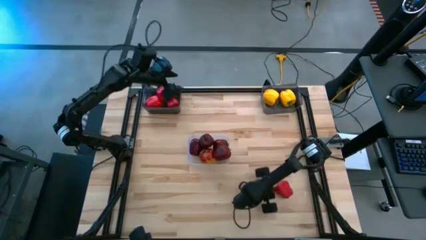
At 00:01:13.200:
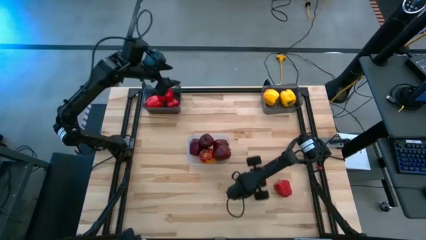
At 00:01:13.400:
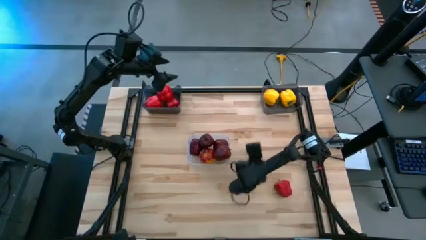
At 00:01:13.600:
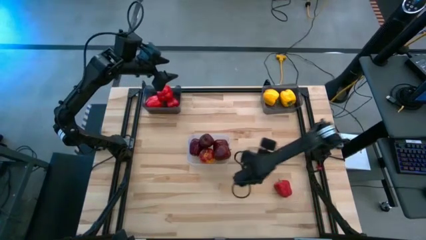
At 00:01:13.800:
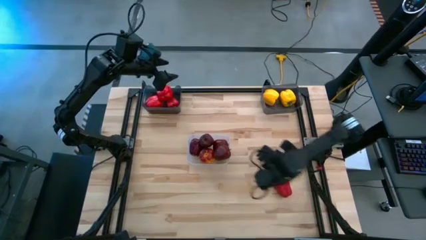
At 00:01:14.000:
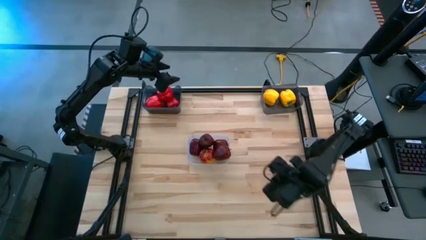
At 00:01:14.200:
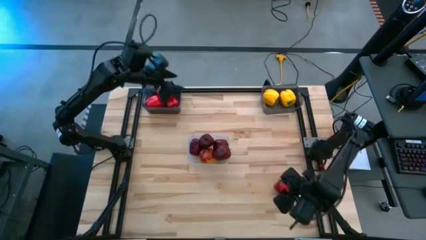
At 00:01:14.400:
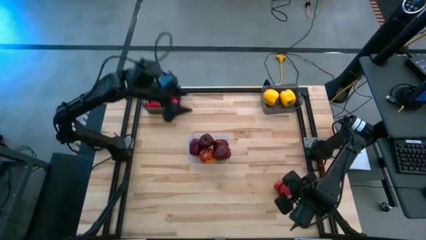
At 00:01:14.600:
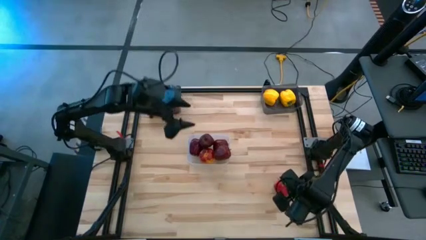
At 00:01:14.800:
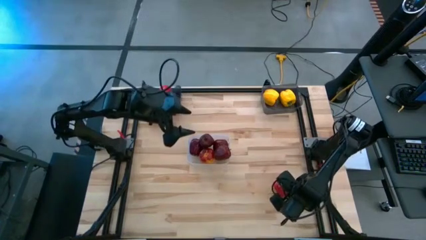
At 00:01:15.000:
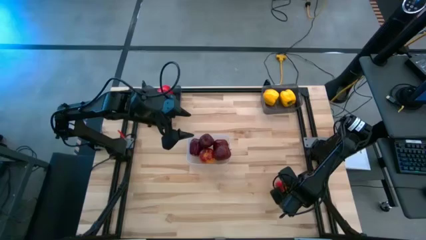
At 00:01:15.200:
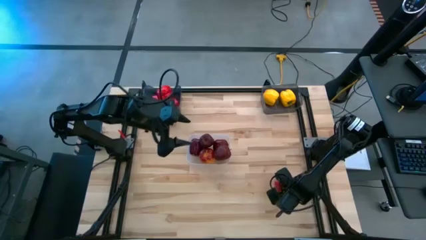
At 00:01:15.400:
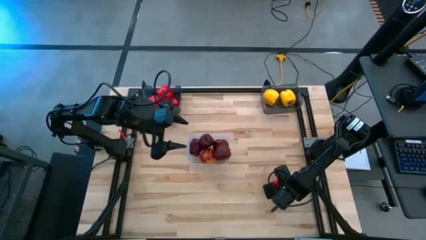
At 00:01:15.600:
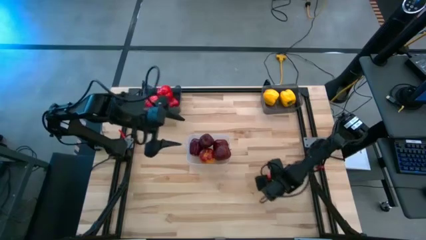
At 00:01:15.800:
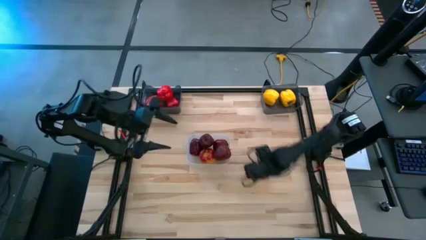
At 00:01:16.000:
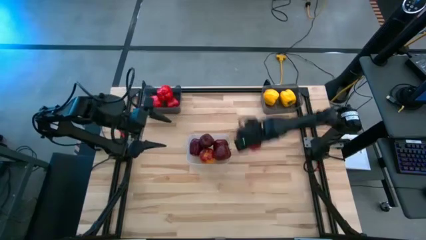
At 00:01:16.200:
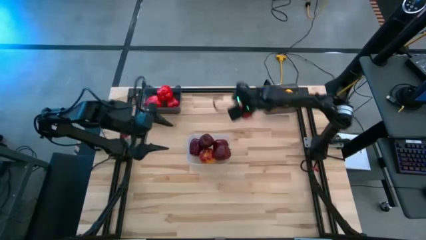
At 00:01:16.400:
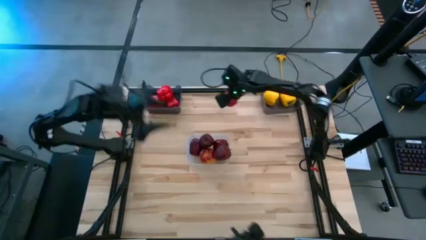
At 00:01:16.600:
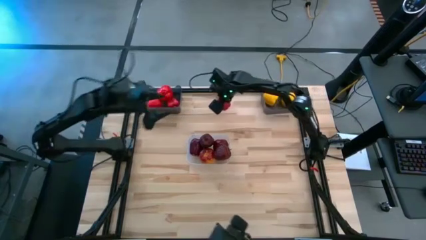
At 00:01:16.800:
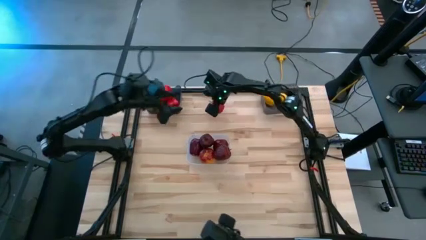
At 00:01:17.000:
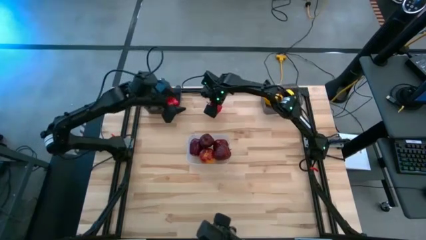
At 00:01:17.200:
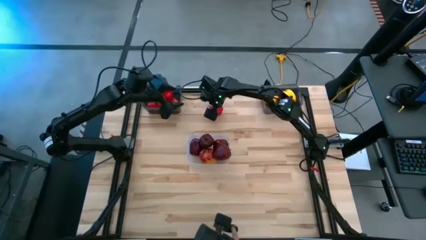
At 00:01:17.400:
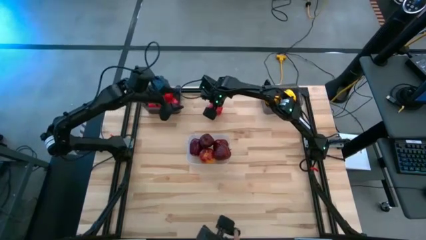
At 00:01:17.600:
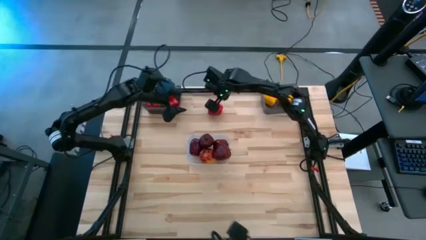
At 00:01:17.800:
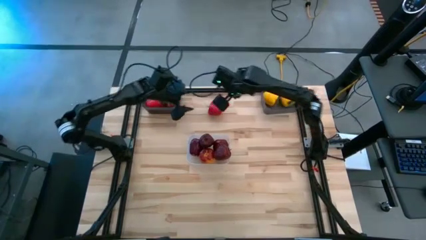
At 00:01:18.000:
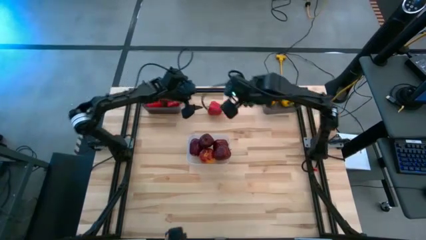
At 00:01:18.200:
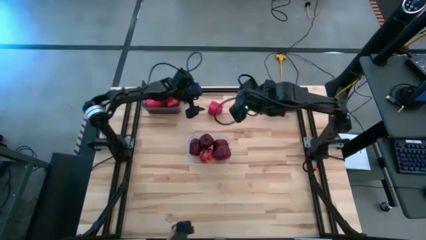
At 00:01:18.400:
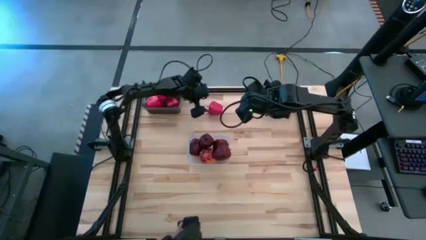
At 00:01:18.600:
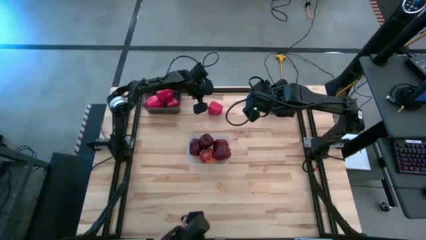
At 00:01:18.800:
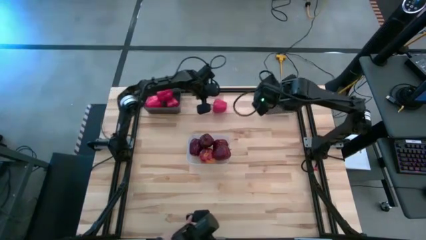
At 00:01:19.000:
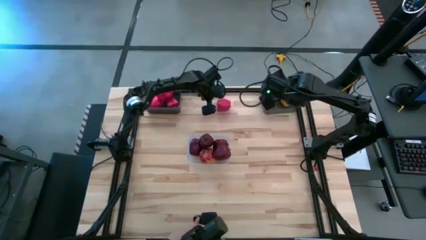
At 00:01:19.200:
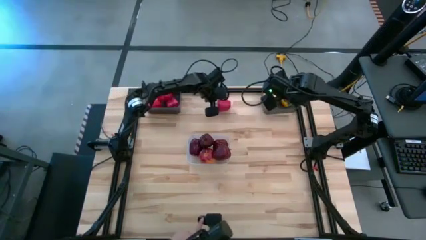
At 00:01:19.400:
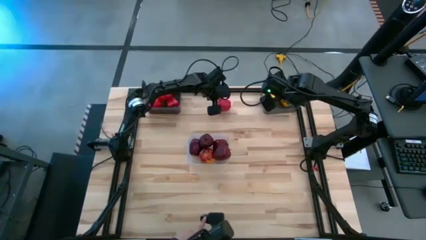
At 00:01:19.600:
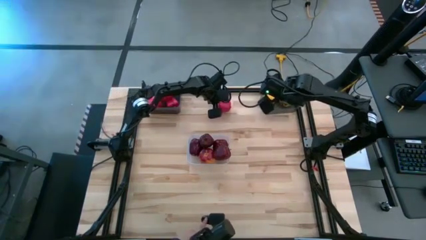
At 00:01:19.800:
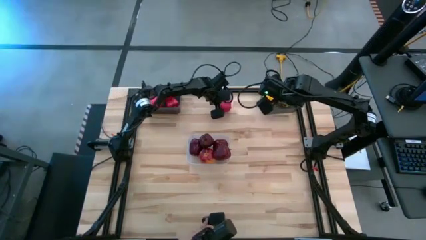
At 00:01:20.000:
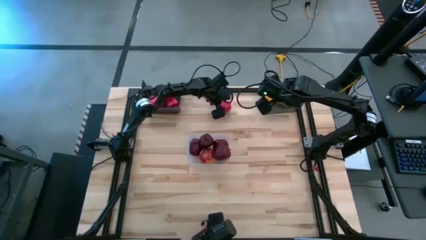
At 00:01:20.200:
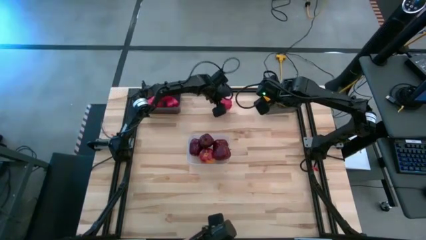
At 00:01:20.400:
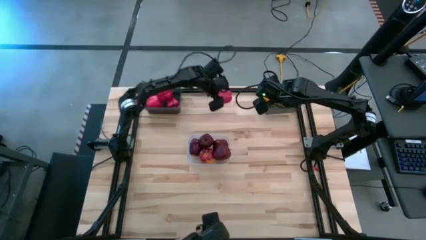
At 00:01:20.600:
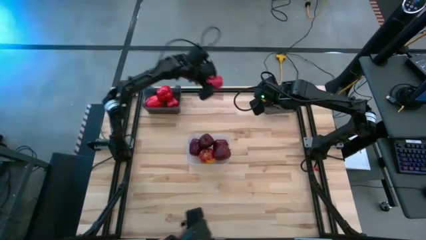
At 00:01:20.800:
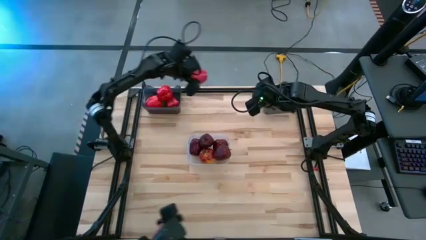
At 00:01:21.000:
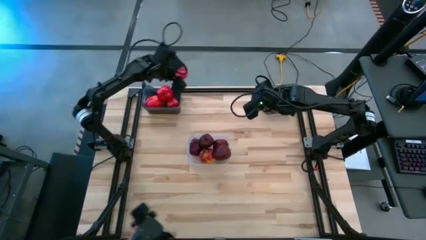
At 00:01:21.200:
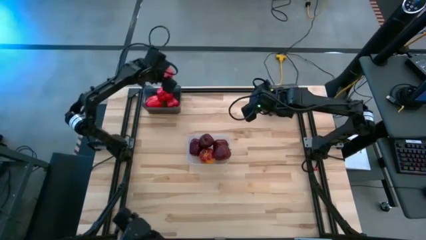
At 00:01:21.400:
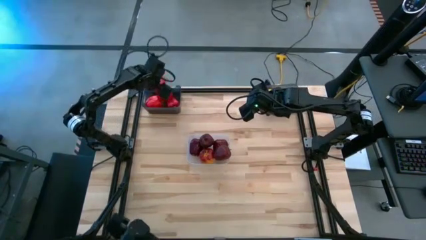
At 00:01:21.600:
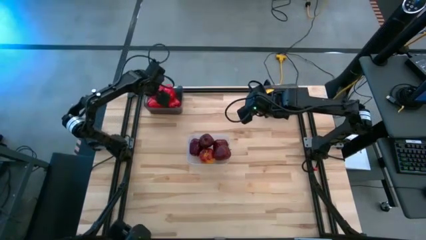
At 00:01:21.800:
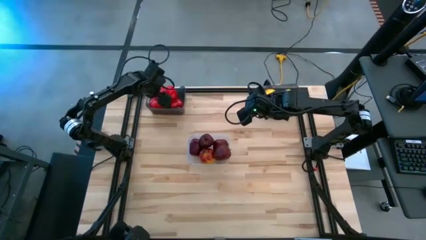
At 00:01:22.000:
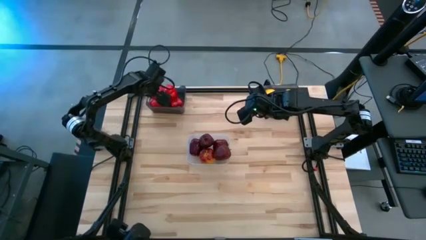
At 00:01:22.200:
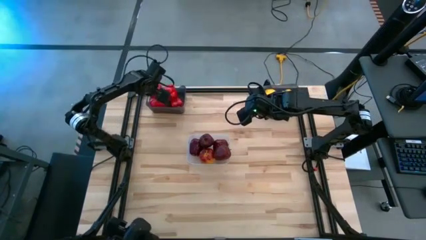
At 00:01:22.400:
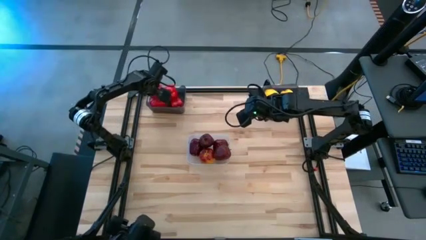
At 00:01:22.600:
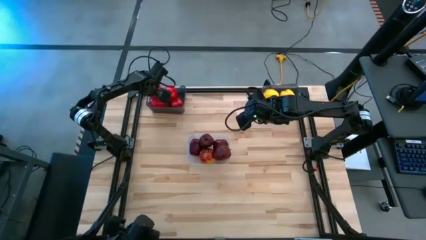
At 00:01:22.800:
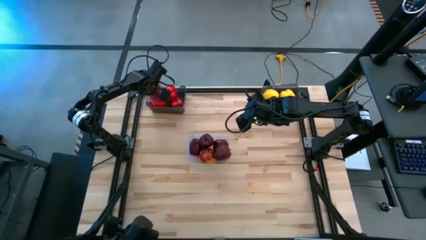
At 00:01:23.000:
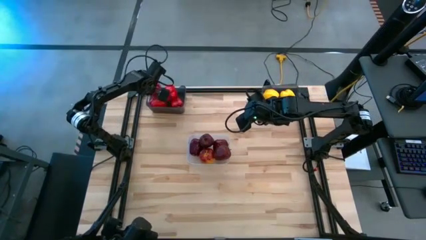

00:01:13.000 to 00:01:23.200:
Task: Sort produce into baskets
Put the red bell pepper into the left black bin

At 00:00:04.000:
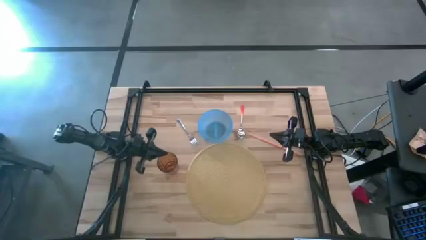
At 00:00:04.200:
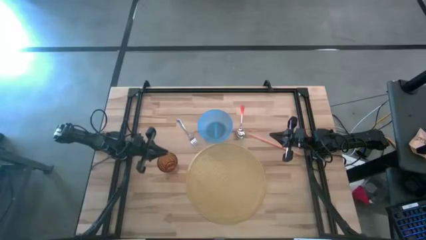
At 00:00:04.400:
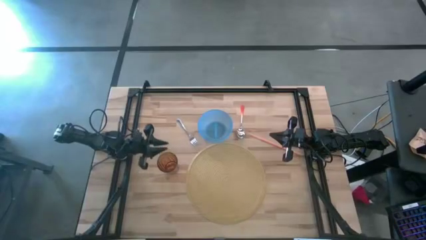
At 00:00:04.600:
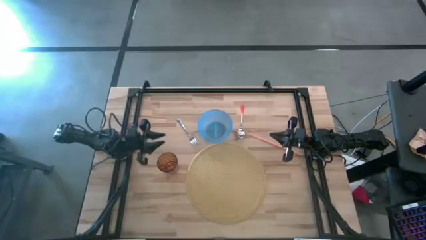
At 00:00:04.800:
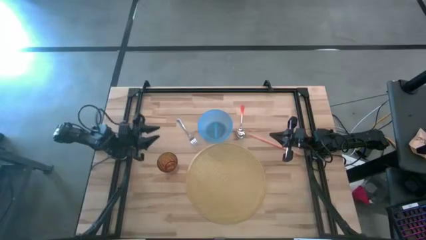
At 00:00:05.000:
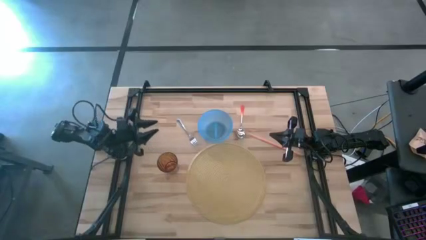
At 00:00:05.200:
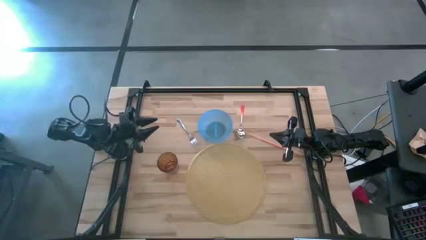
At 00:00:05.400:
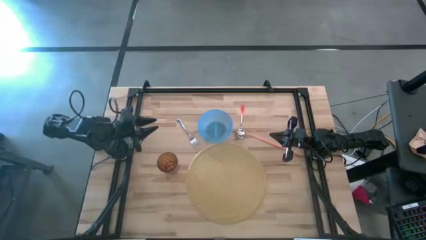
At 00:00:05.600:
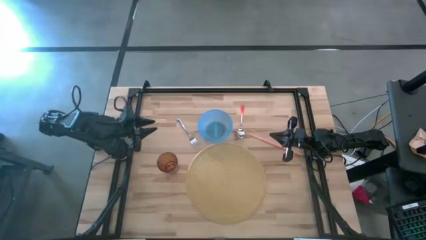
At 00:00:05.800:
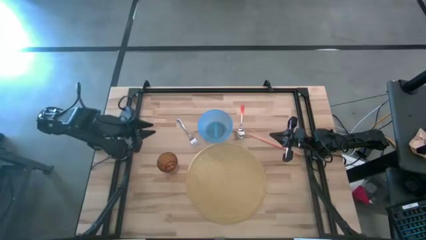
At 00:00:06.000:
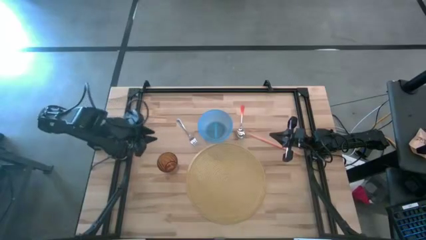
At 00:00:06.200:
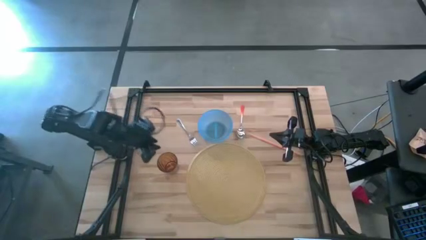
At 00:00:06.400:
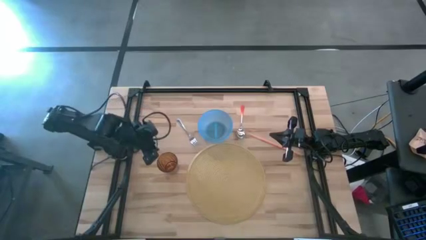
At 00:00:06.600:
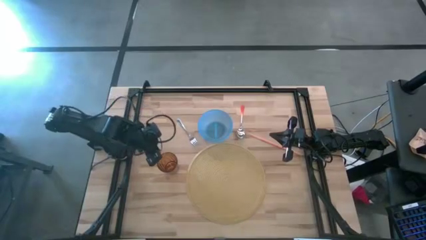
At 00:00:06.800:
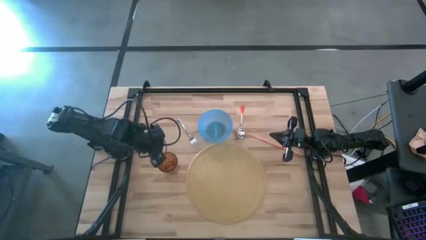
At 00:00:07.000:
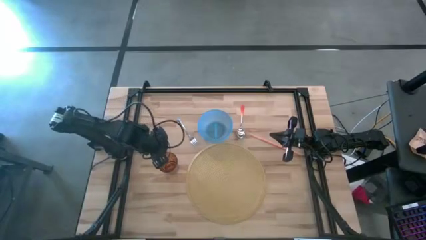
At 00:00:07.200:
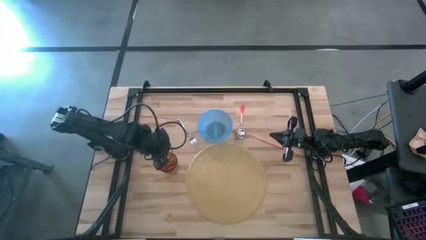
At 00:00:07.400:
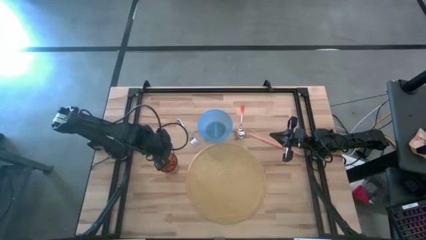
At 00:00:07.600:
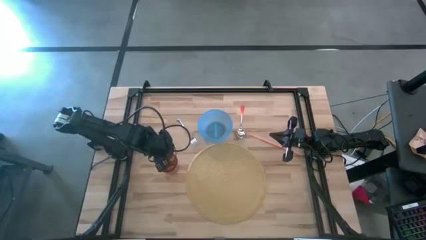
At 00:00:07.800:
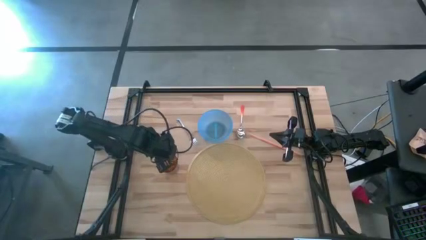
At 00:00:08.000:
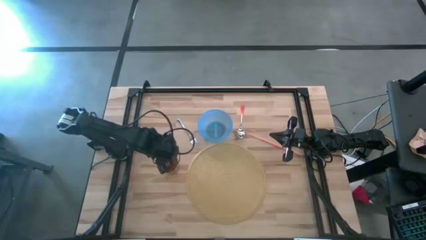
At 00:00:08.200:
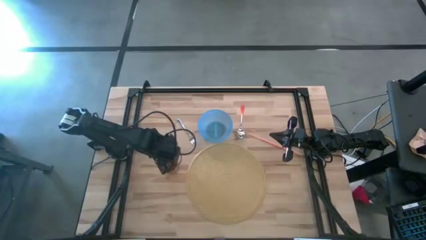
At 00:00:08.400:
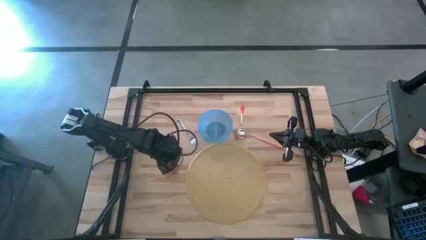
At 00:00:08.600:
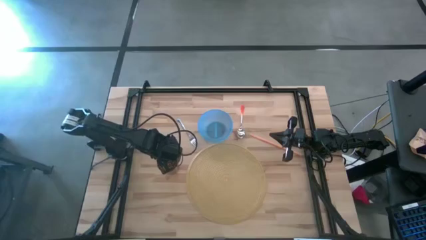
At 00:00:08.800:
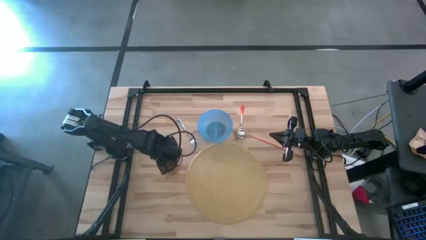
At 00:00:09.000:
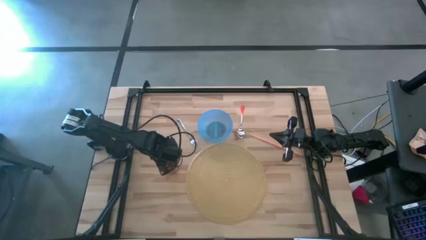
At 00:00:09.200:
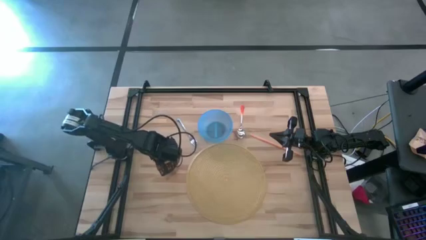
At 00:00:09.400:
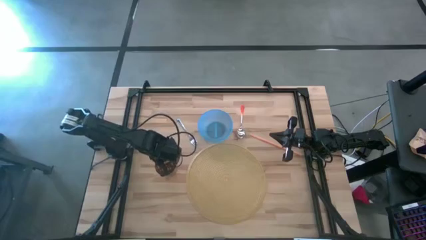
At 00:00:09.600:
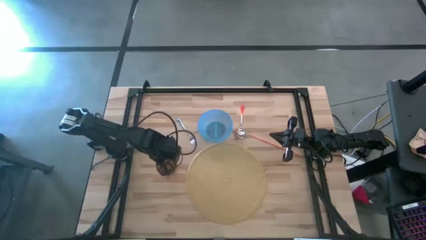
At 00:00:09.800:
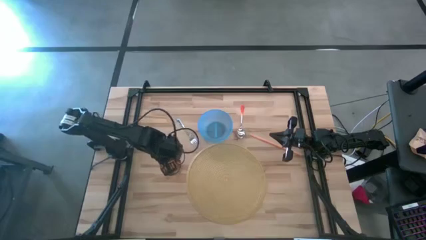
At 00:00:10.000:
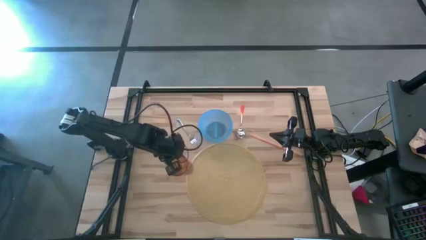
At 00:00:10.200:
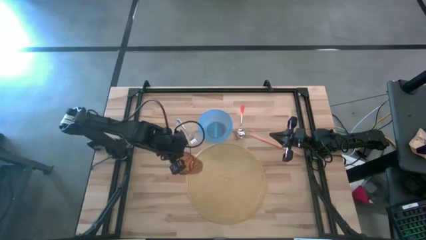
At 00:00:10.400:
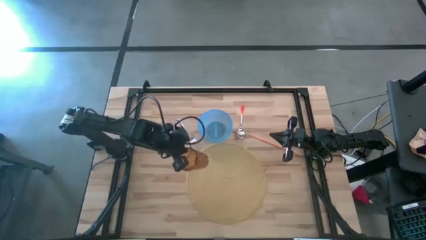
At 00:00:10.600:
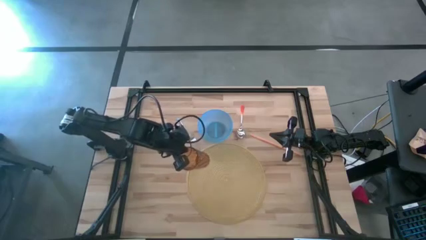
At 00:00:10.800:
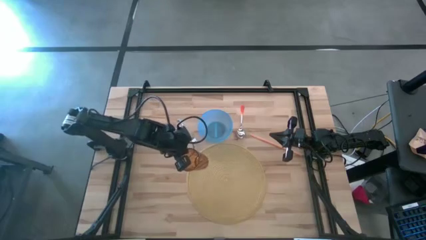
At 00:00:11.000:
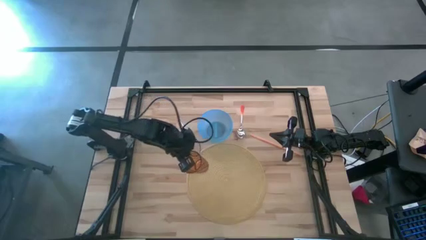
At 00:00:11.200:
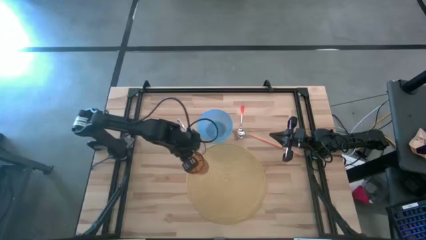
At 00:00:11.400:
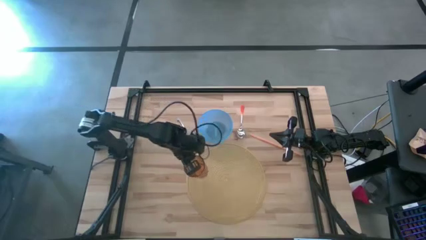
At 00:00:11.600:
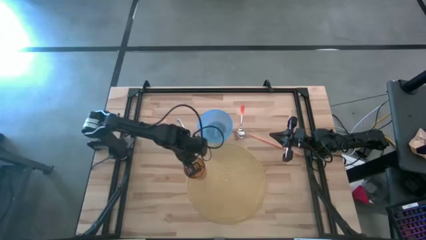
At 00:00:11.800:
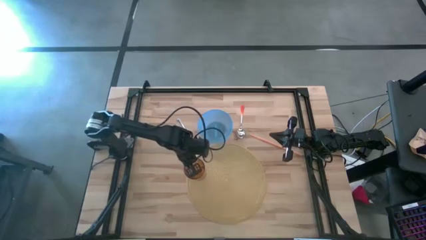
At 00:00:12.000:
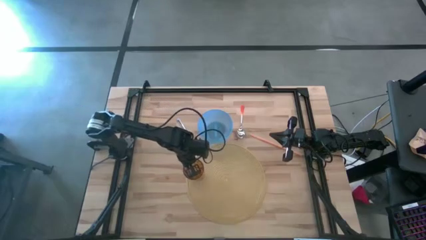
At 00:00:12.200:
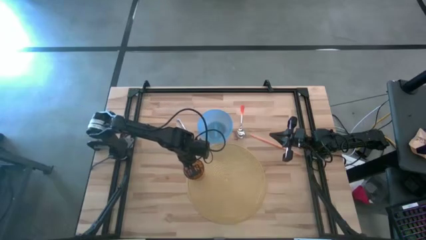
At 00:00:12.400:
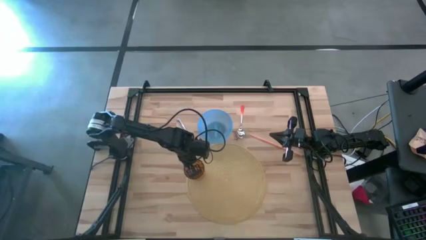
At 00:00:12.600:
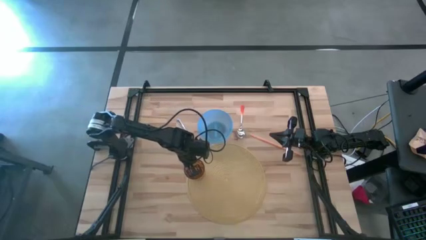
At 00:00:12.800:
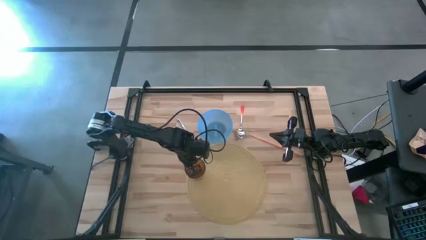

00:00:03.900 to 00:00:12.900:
Task: Pick & Place Utensil
Put the orange cup on the brown mat
